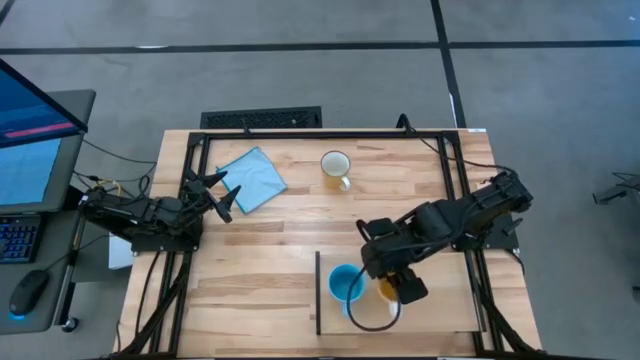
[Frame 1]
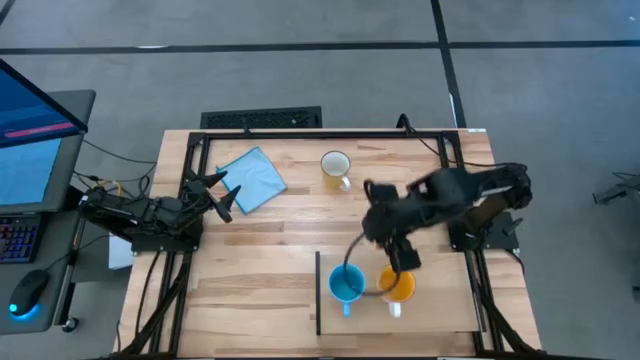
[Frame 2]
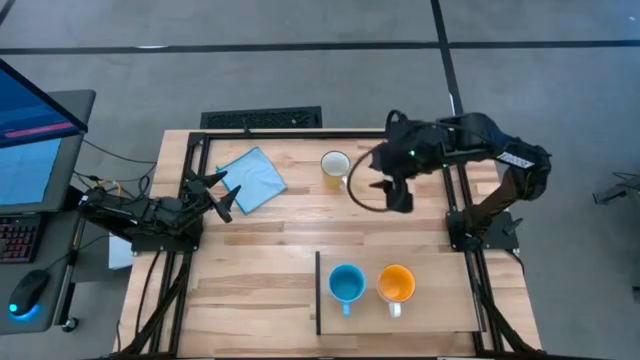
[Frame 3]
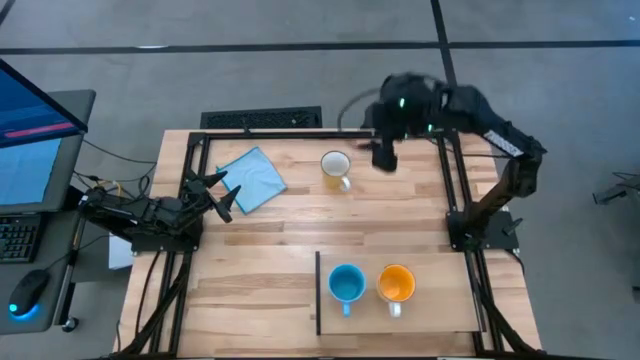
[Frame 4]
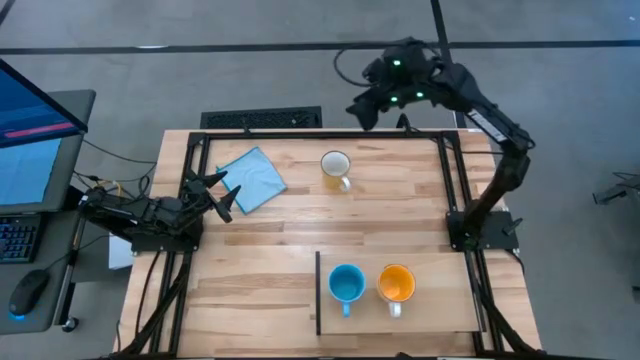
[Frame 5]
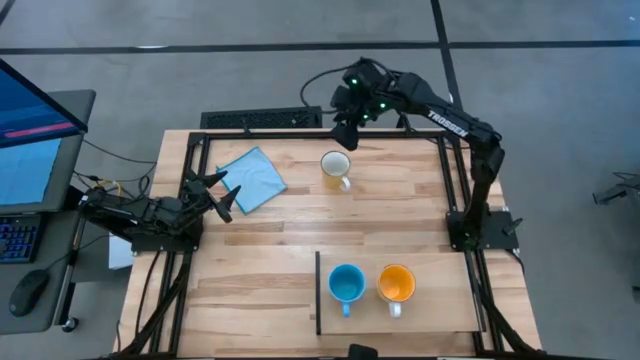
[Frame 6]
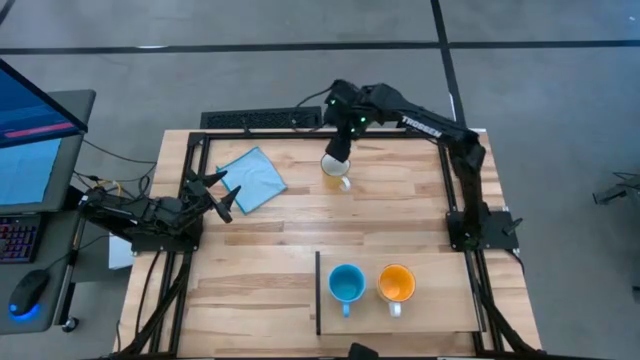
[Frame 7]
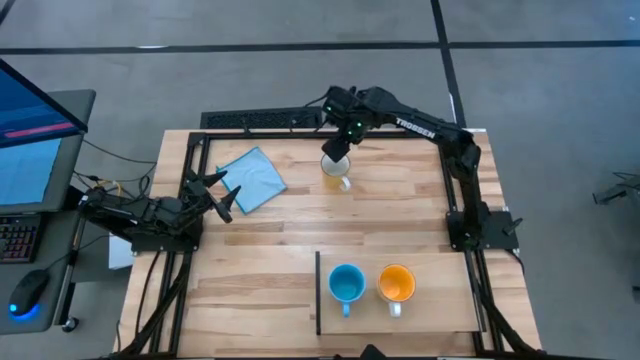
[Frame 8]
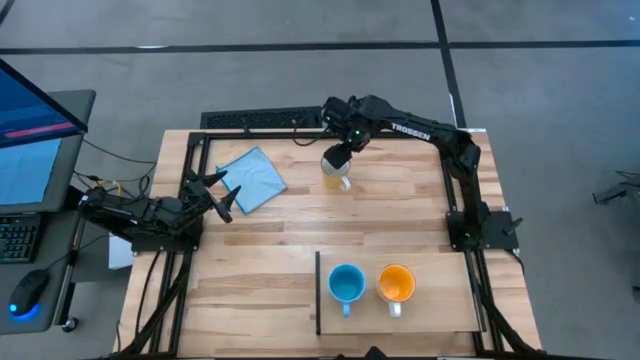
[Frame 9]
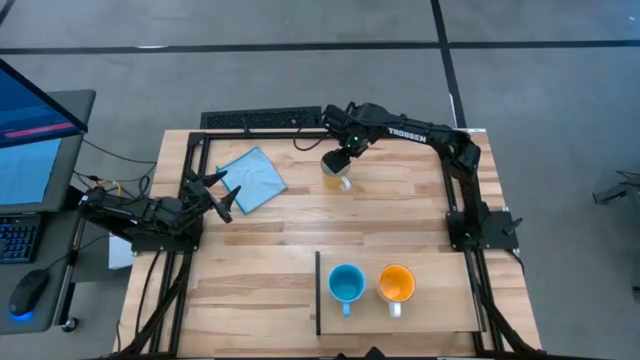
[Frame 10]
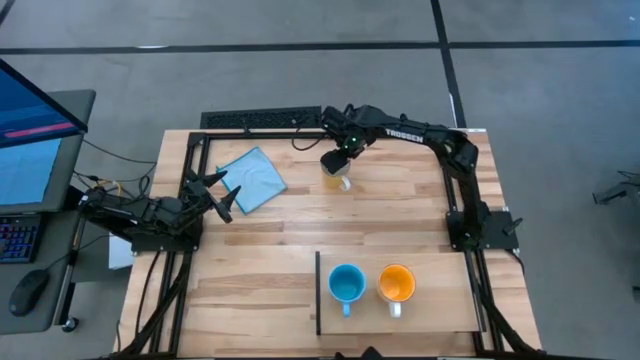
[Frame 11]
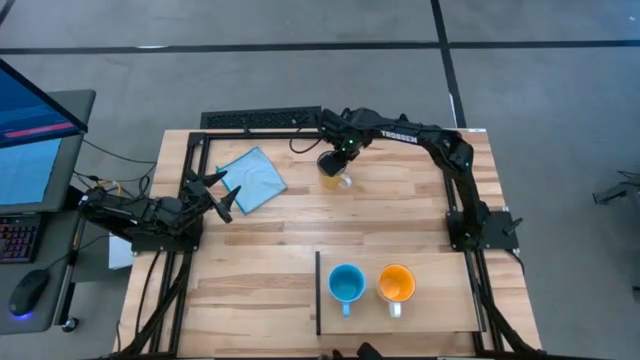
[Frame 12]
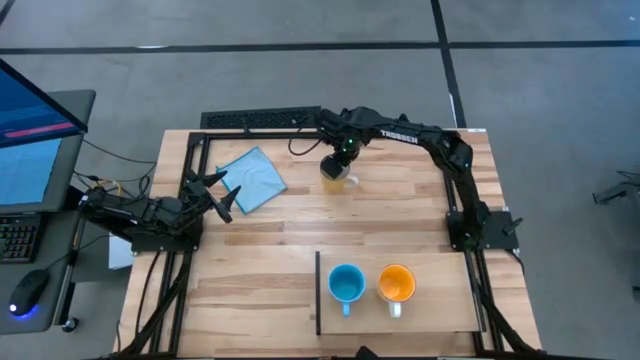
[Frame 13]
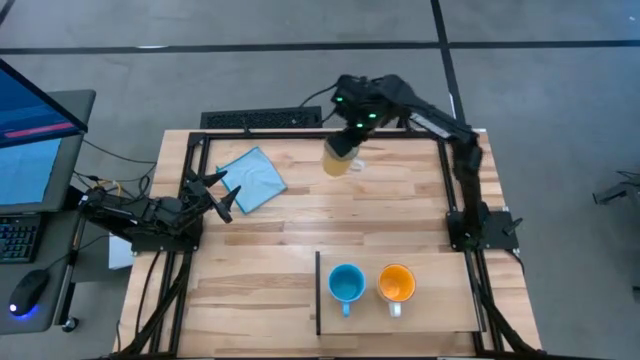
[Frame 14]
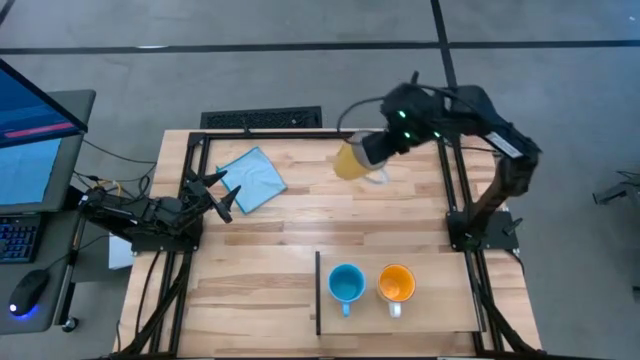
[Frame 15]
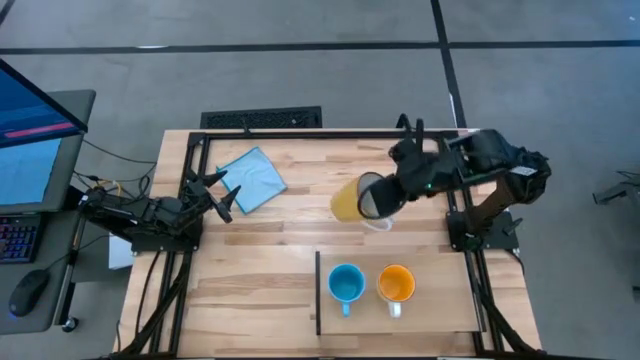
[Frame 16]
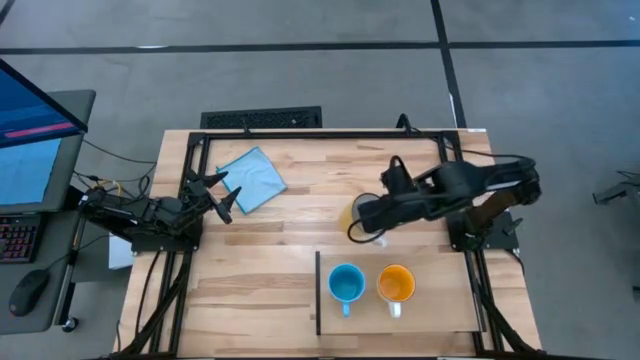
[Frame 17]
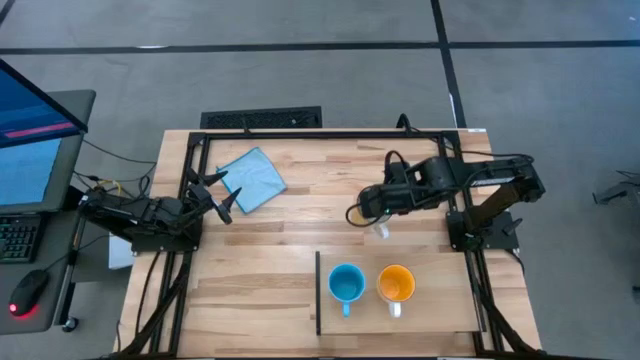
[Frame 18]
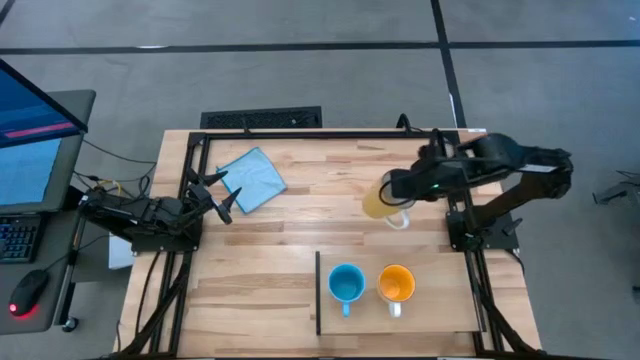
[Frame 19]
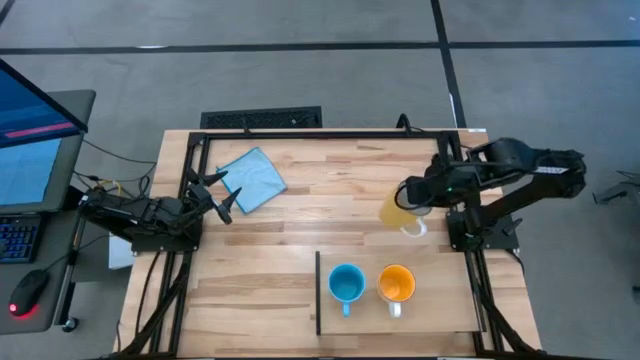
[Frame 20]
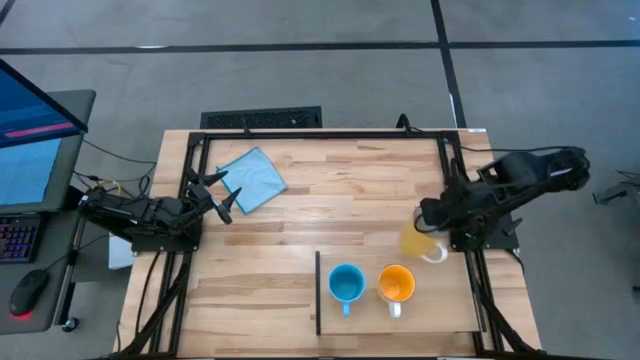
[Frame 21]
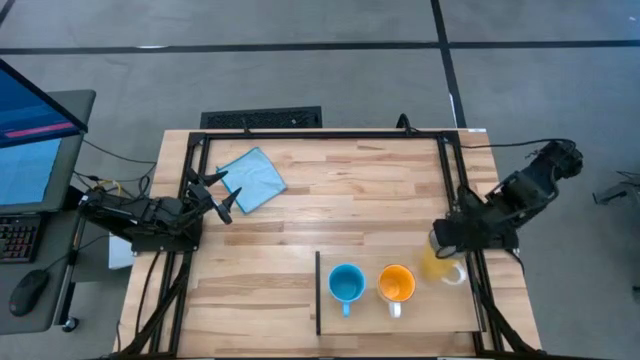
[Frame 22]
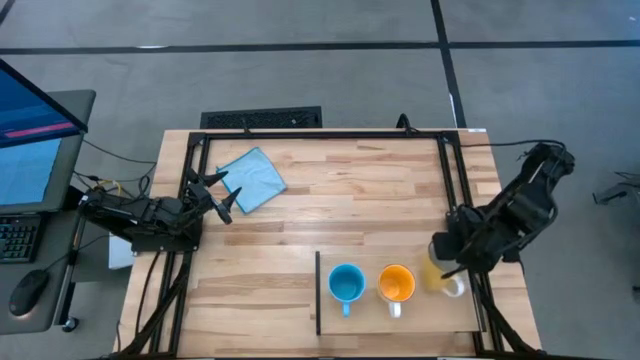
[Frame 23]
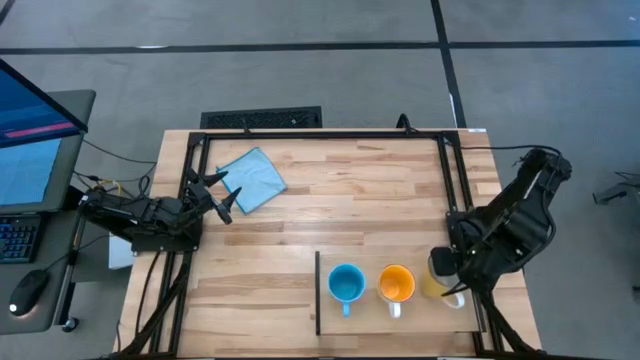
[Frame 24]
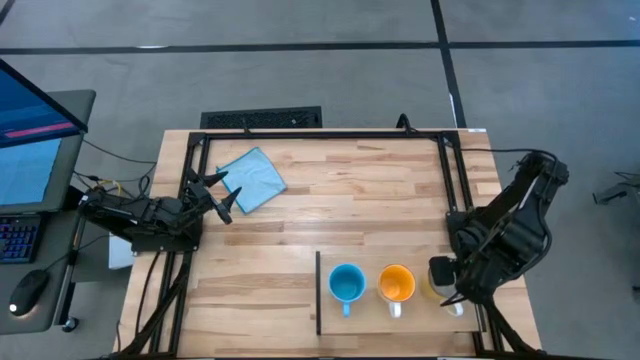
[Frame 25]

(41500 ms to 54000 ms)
Task: Stack small to large cups/mugs on shelf
Put the yellow mug on the shelf
